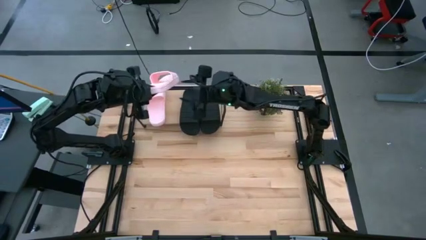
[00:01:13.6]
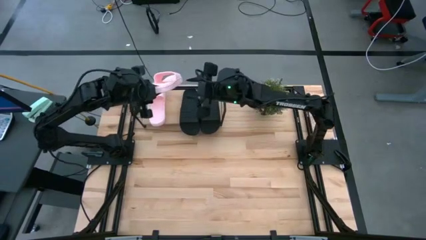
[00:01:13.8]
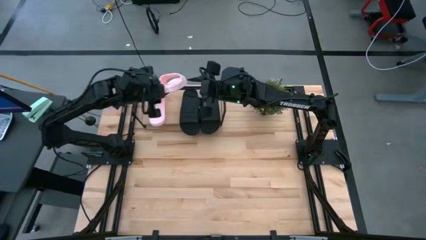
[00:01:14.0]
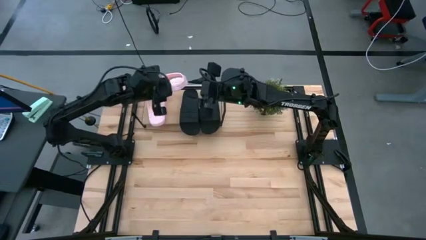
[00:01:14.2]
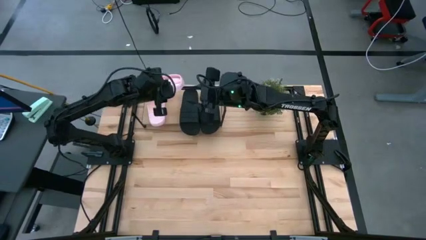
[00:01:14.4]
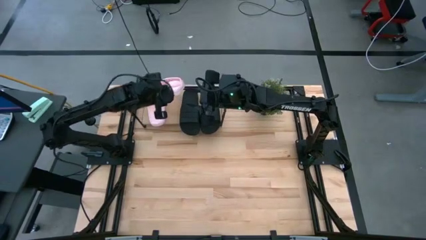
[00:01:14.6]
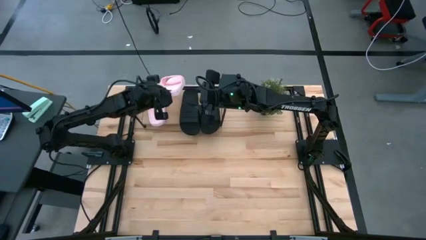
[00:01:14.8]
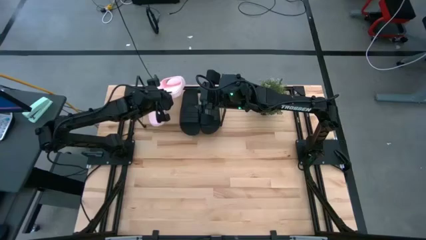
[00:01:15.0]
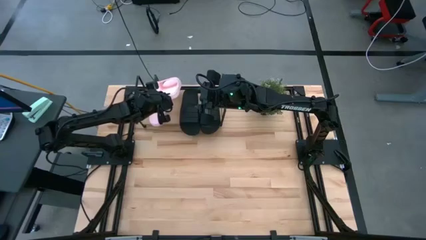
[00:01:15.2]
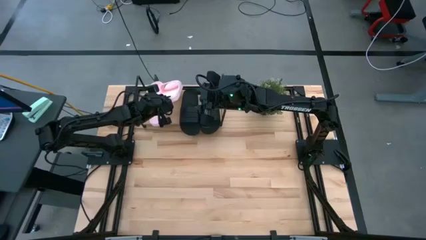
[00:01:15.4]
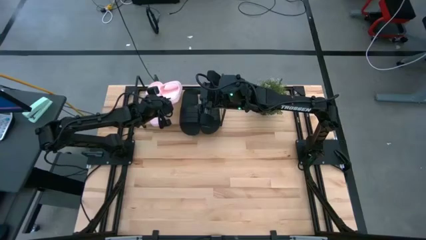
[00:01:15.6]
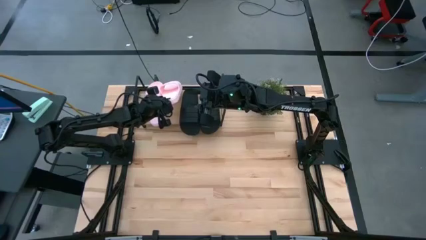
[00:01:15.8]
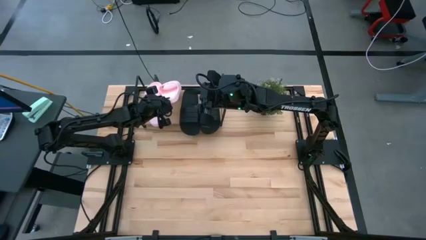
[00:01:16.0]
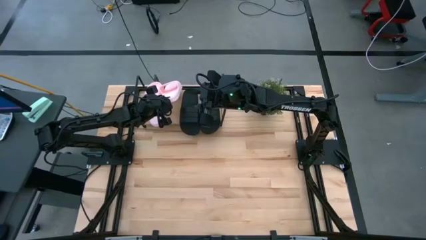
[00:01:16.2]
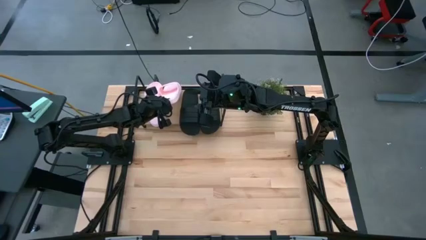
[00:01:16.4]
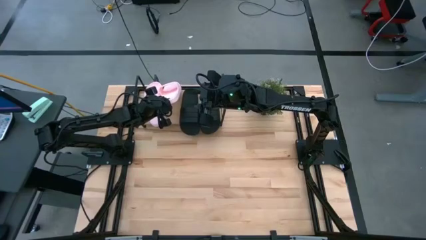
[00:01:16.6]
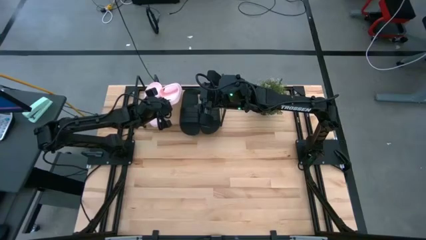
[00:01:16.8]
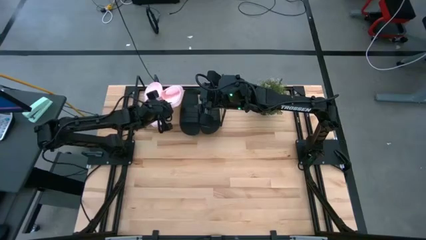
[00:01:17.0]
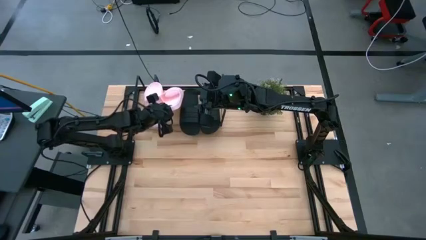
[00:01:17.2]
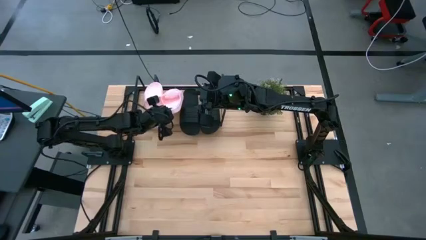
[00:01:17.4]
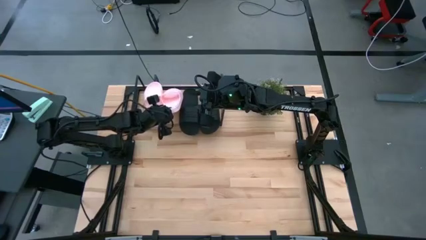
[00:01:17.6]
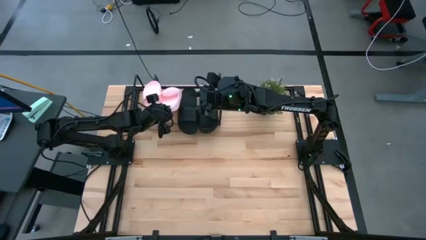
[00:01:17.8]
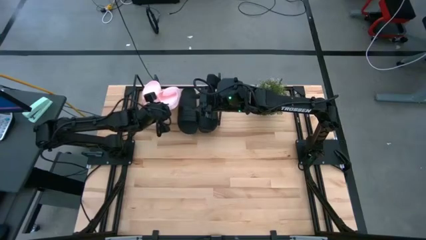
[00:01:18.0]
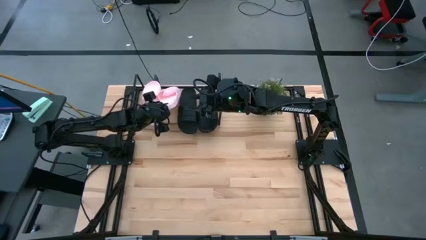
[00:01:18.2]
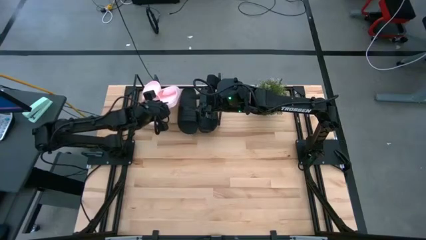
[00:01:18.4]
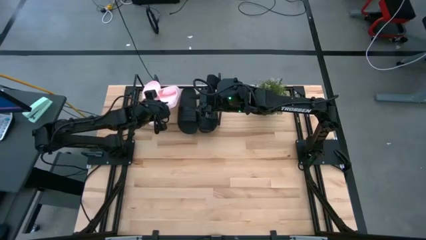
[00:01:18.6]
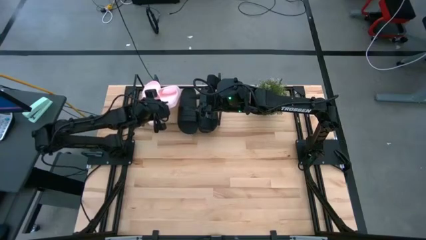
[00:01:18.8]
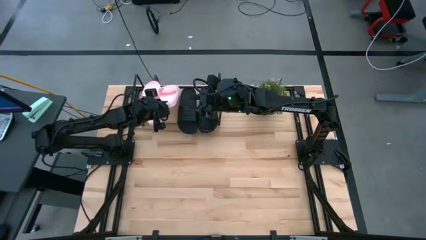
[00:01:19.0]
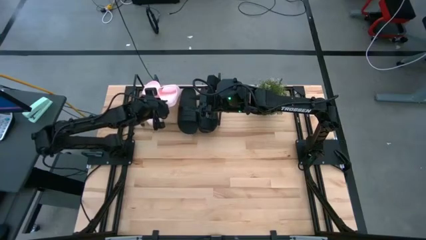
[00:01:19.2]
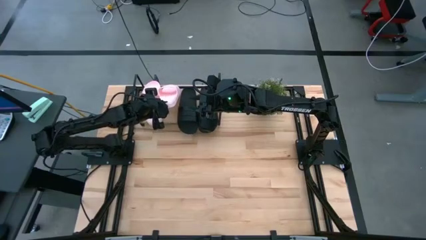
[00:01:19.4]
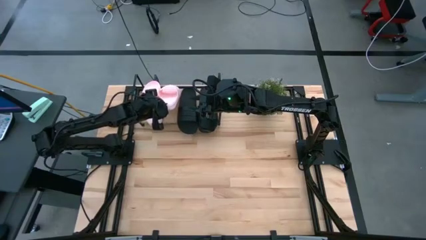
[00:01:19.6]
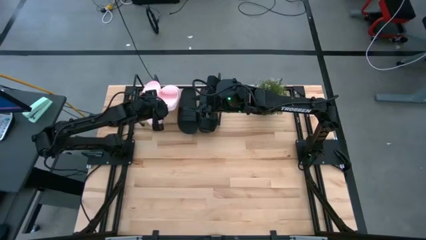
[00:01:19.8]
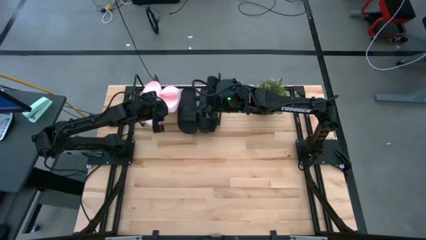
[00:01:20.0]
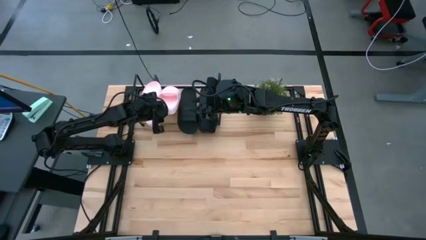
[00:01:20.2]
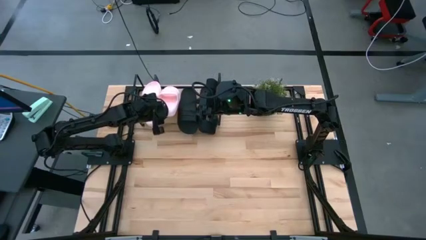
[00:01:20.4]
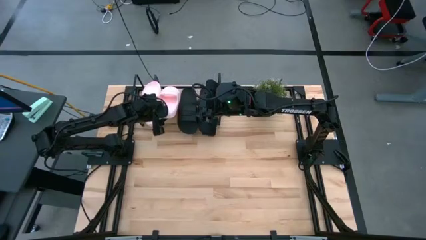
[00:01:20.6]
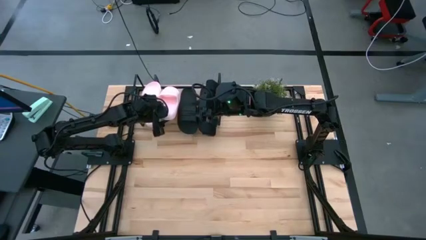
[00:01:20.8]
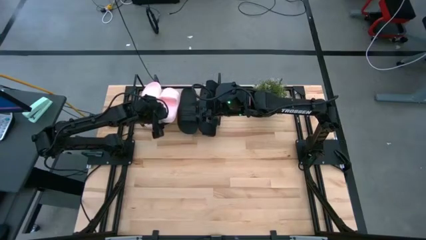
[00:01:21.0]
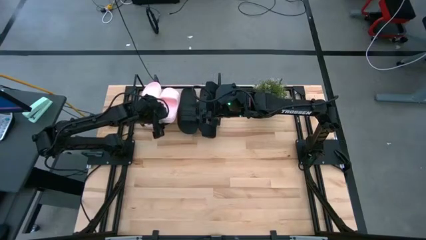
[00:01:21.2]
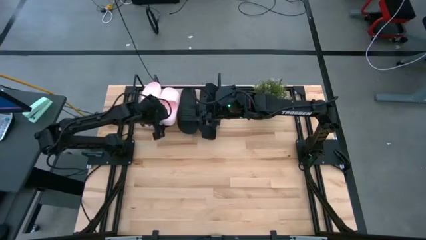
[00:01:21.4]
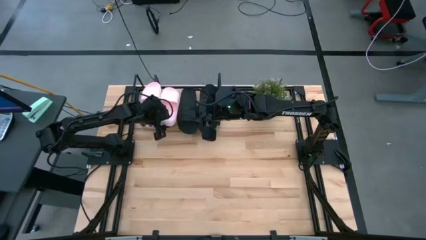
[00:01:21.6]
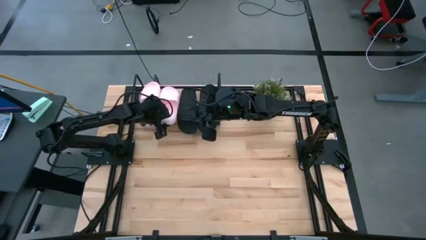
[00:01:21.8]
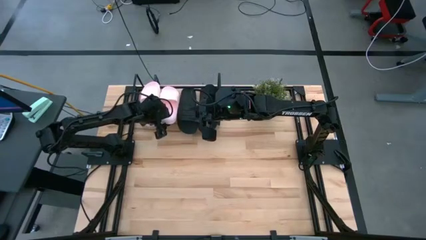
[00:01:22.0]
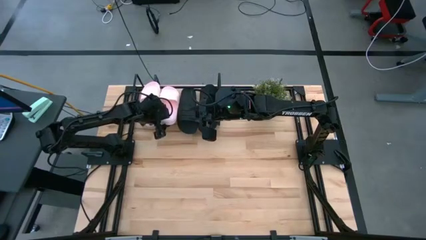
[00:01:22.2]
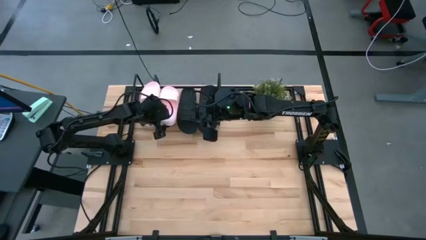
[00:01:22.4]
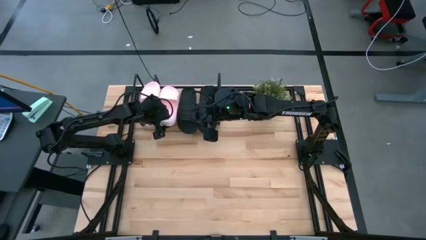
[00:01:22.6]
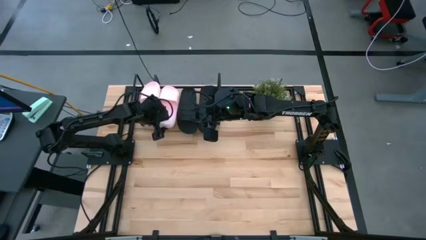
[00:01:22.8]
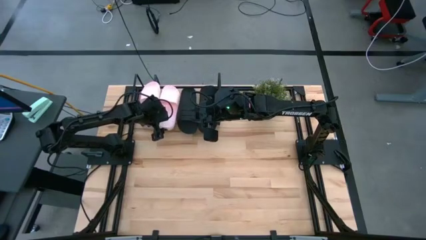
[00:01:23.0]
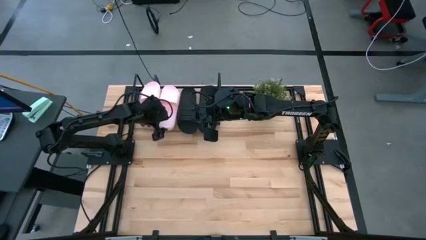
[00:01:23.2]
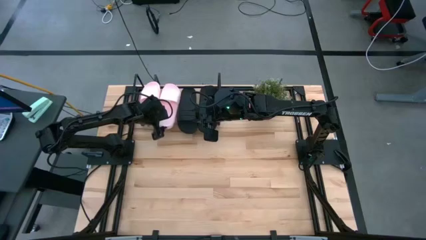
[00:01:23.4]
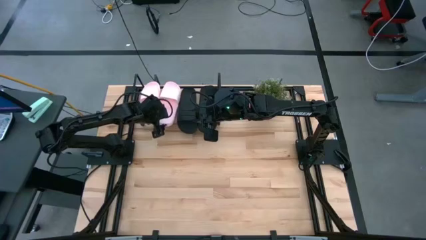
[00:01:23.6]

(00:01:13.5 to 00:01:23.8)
Task: Pick and place slides into the shelf
Put the pink slipper onto the shelf
